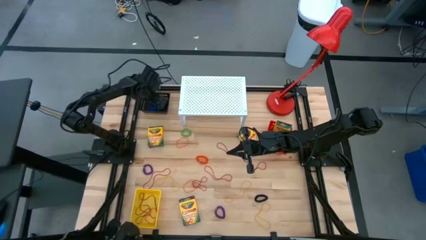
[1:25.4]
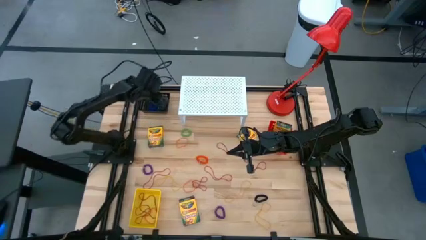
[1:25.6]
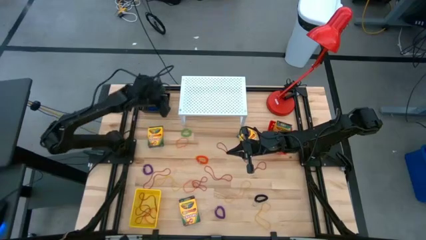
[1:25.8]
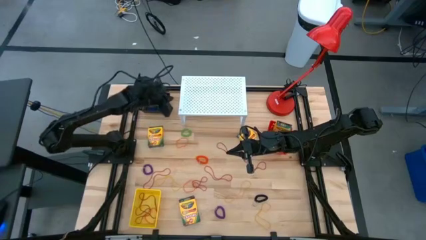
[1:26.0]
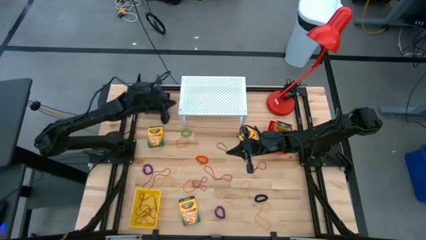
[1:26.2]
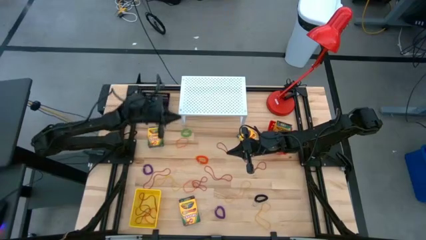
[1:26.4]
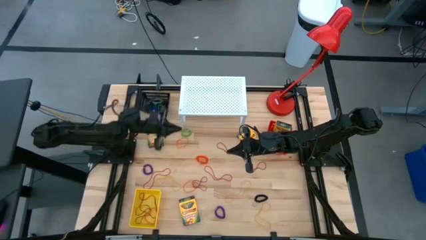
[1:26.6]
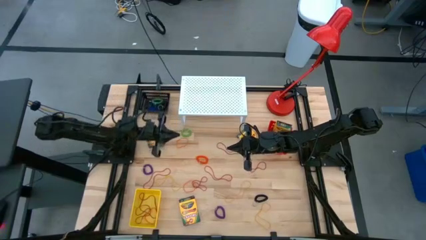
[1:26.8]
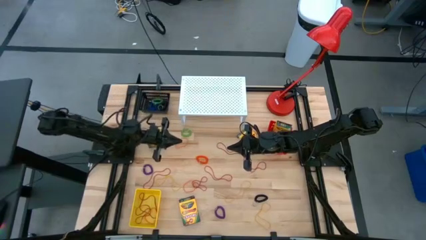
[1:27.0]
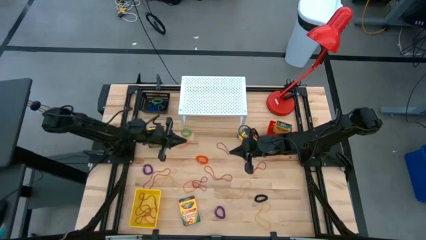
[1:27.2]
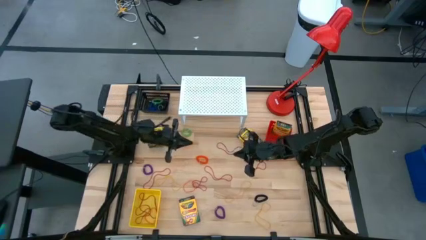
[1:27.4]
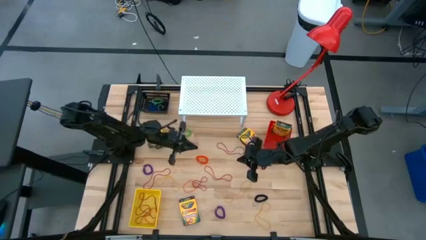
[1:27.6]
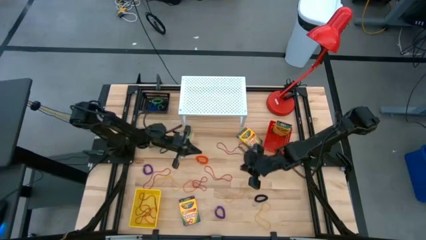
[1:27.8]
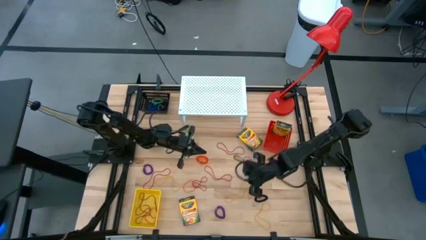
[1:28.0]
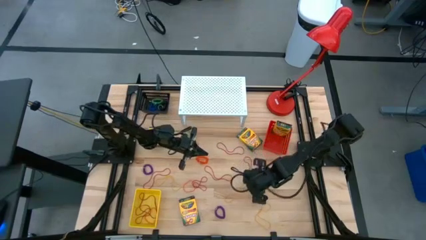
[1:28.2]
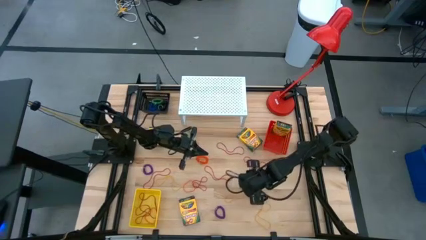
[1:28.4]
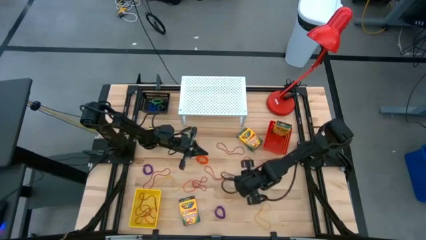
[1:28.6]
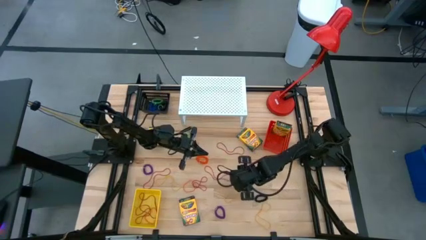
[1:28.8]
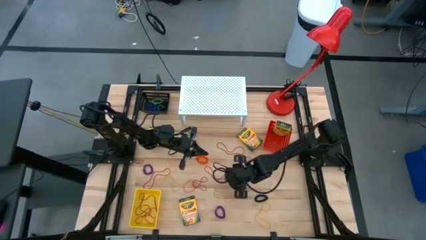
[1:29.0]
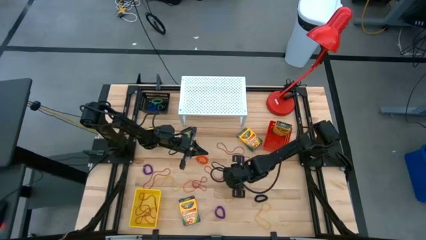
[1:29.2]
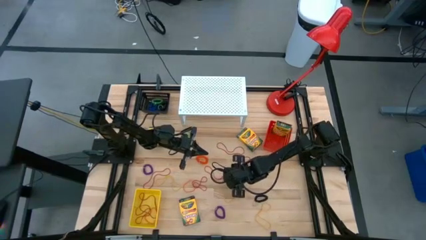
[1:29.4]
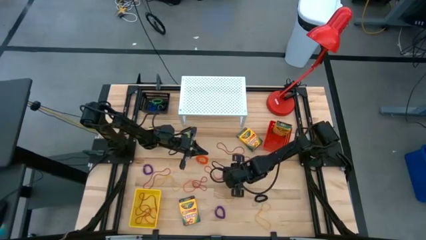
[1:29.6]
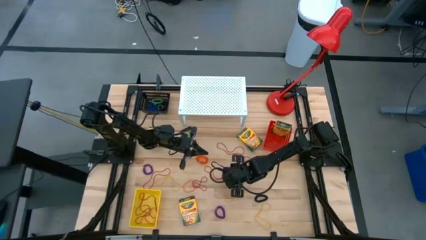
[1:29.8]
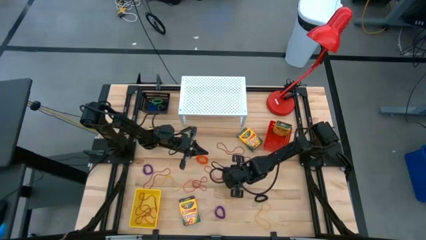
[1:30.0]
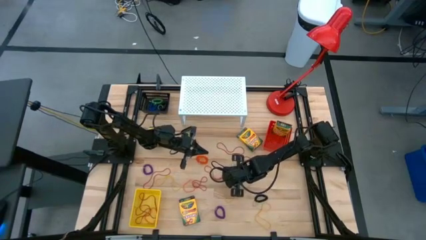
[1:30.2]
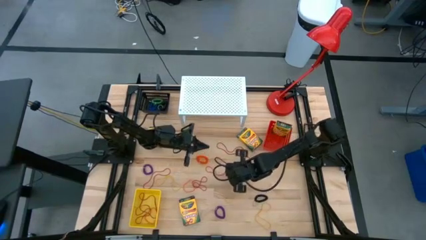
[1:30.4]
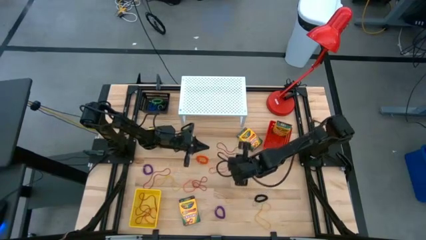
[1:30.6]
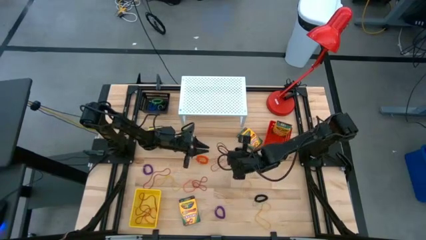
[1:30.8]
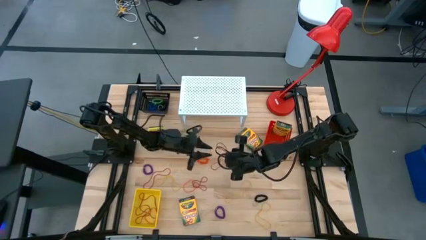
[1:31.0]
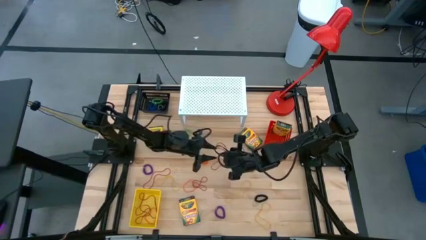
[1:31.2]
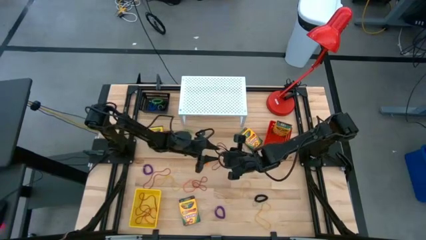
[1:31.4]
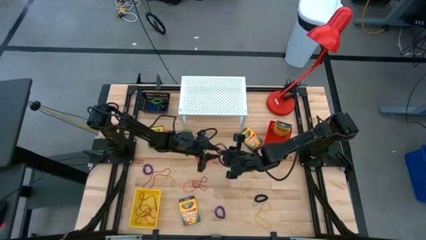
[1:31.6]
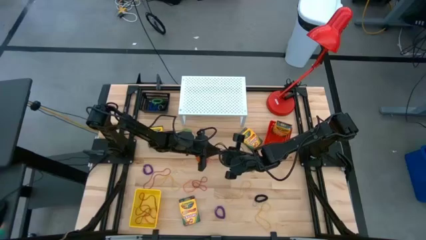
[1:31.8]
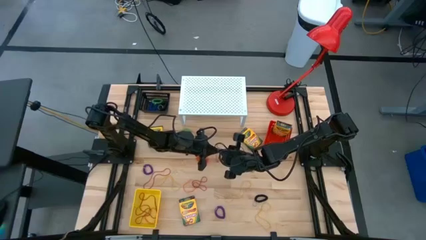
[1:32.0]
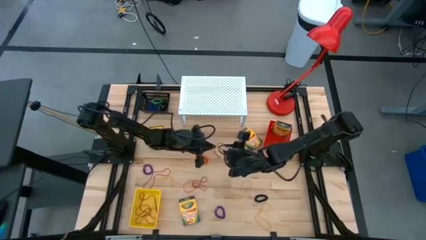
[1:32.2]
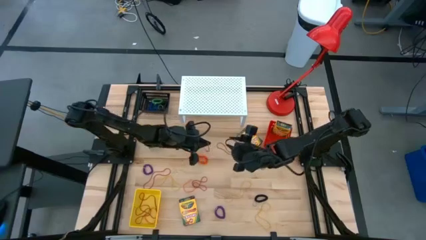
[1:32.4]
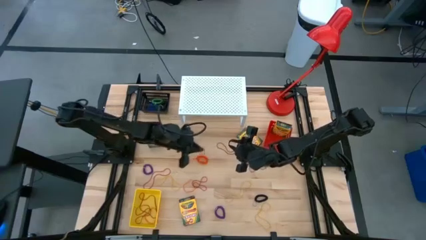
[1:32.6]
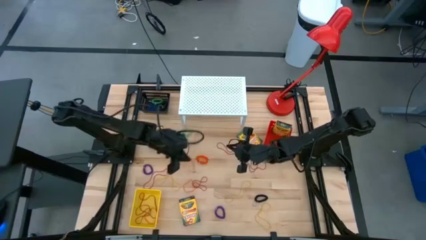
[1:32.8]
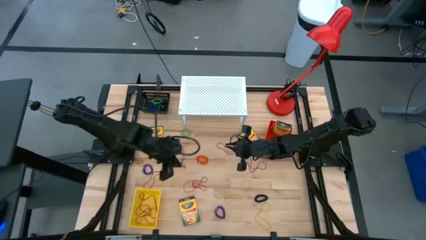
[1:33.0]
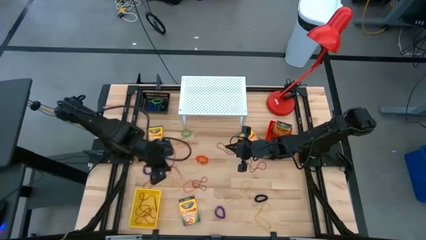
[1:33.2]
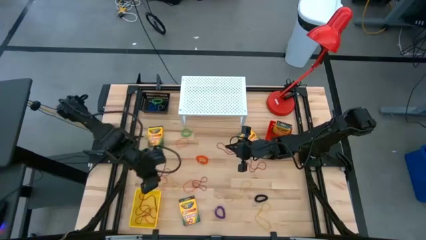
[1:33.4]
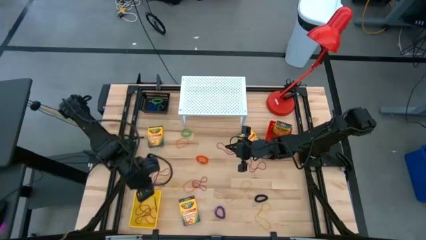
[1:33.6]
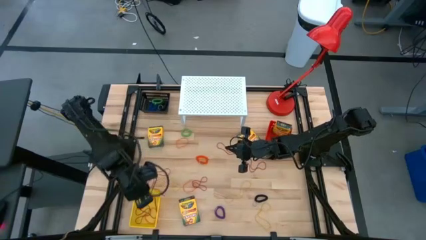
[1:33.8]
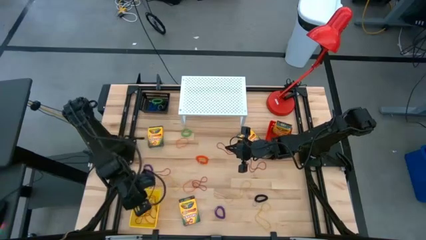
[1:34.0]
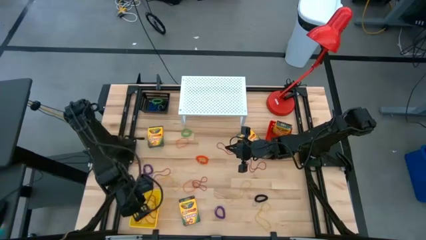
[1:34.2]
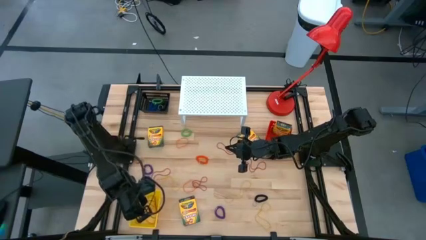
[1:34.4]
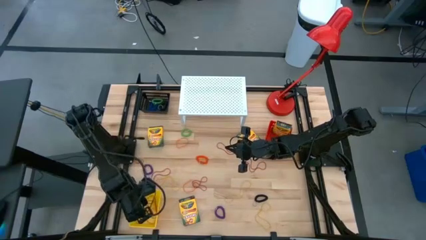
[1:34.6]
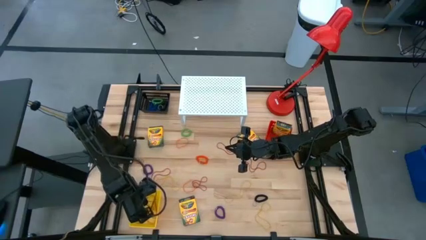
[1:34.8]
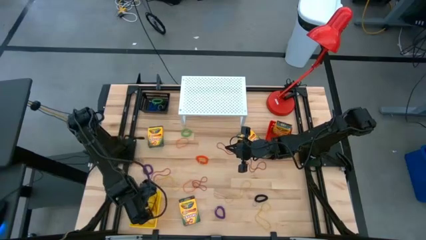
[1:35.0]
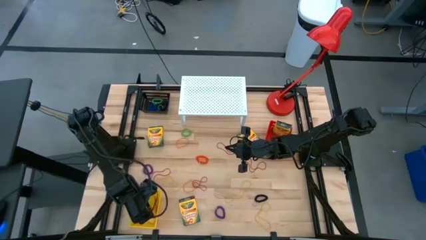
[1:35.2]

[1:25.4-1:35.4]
Task: Pick & Place Office Desk Supplies
Put the red rubber band into the yellow bin

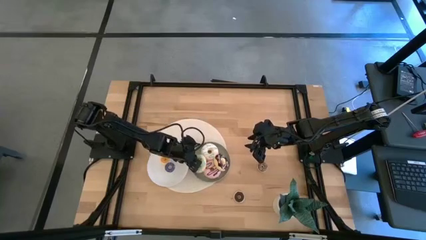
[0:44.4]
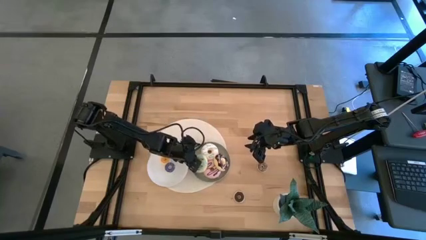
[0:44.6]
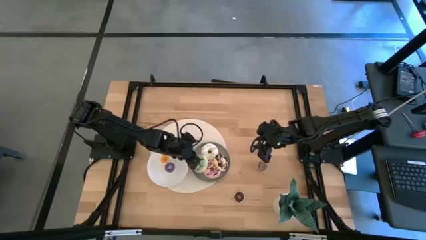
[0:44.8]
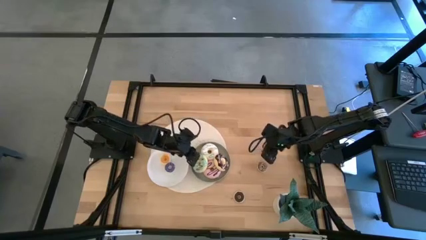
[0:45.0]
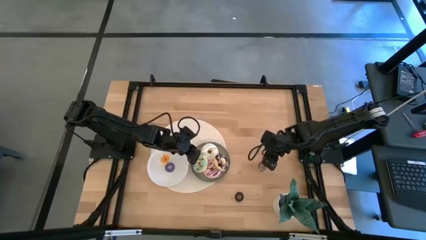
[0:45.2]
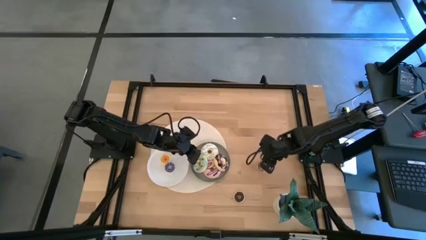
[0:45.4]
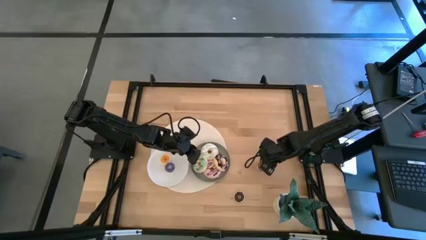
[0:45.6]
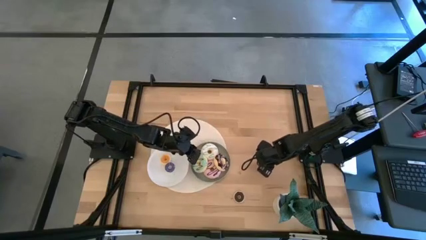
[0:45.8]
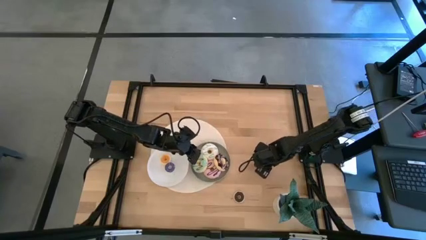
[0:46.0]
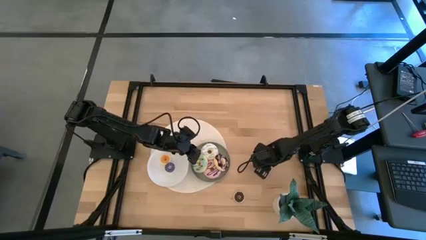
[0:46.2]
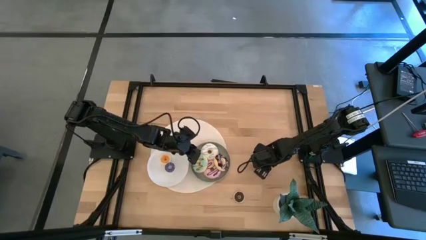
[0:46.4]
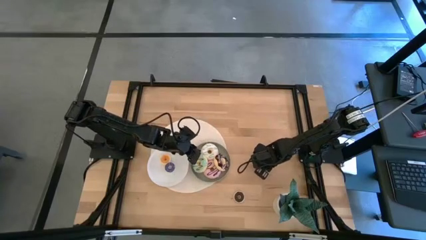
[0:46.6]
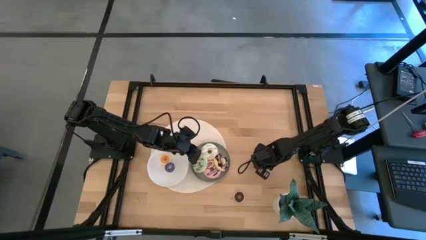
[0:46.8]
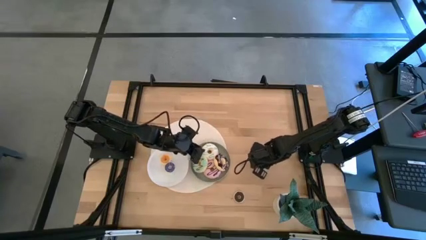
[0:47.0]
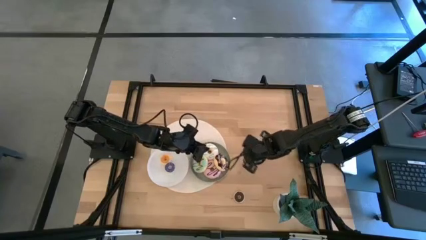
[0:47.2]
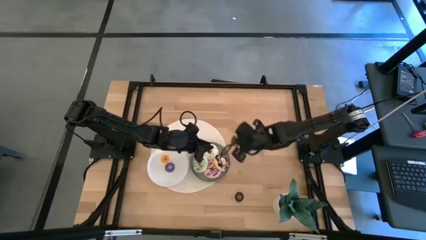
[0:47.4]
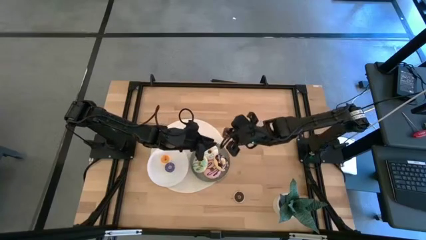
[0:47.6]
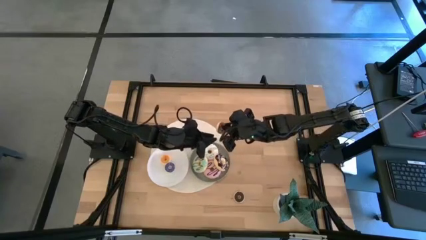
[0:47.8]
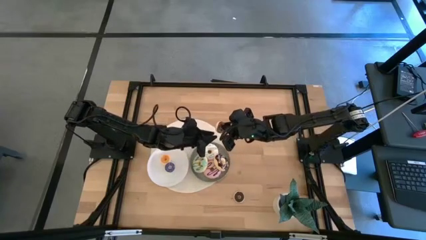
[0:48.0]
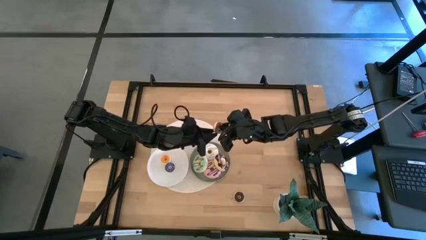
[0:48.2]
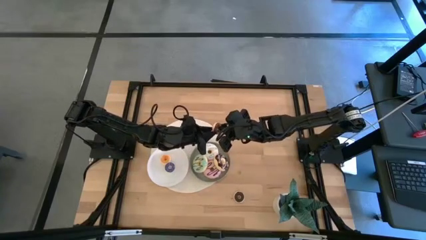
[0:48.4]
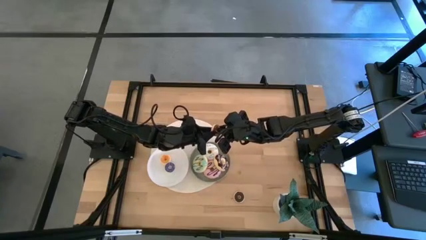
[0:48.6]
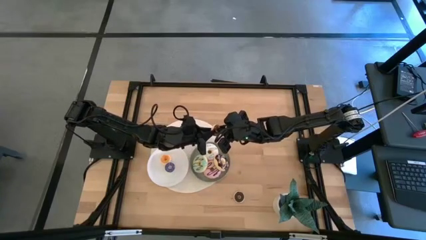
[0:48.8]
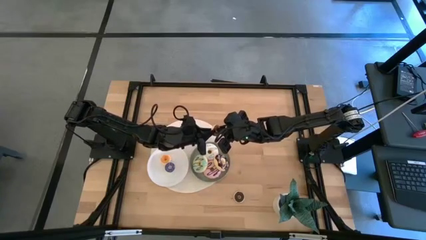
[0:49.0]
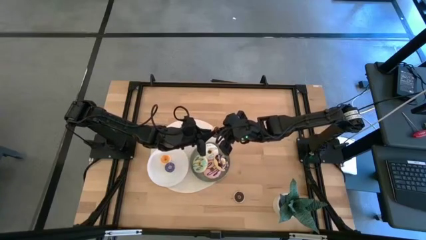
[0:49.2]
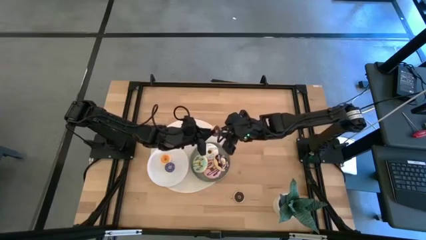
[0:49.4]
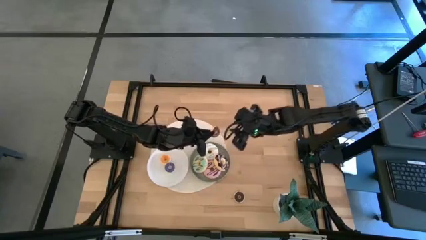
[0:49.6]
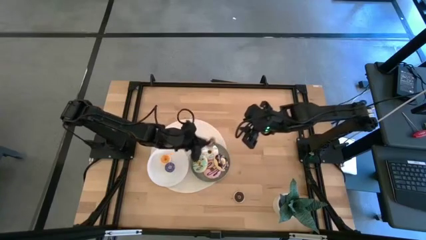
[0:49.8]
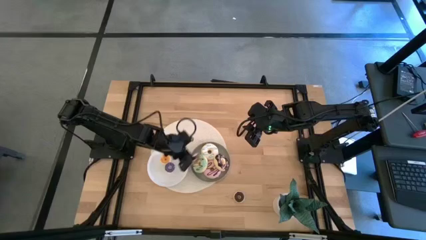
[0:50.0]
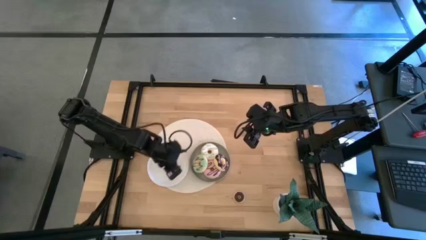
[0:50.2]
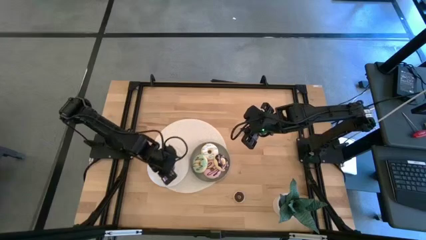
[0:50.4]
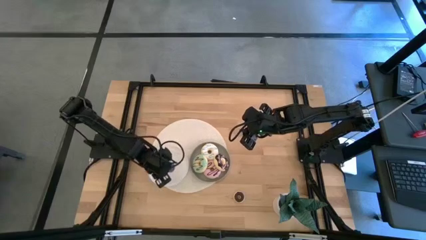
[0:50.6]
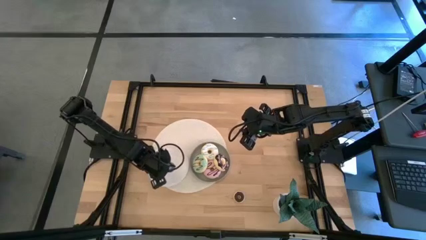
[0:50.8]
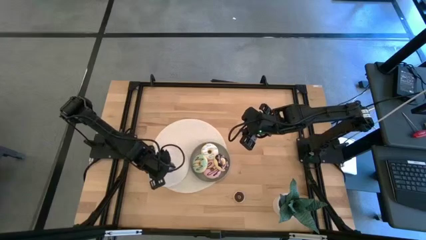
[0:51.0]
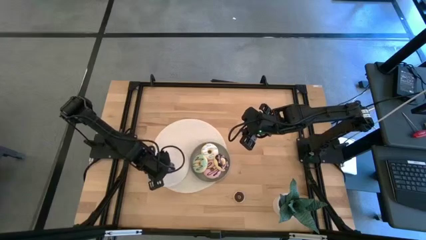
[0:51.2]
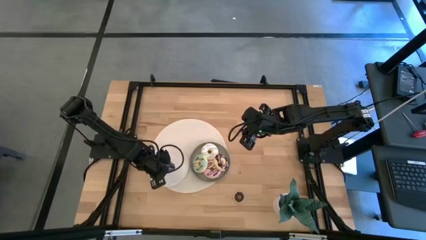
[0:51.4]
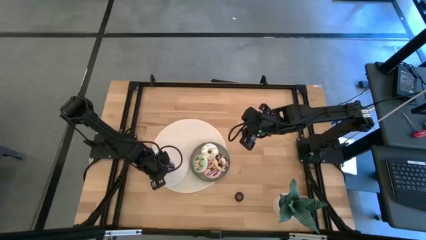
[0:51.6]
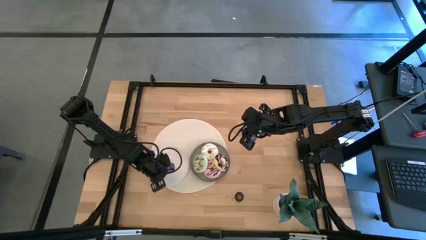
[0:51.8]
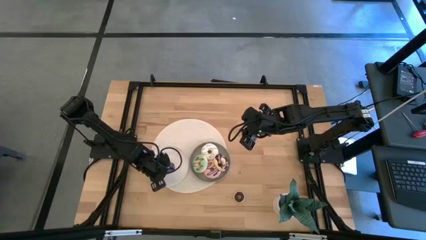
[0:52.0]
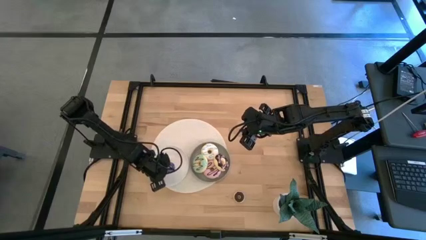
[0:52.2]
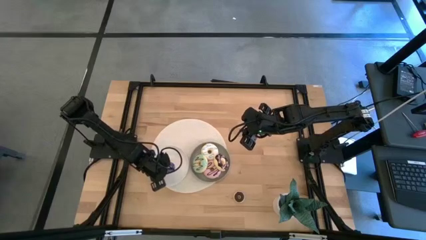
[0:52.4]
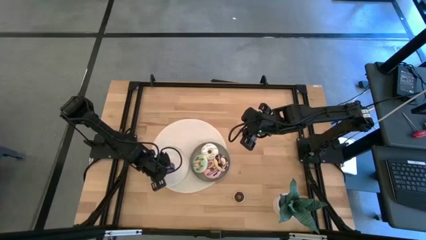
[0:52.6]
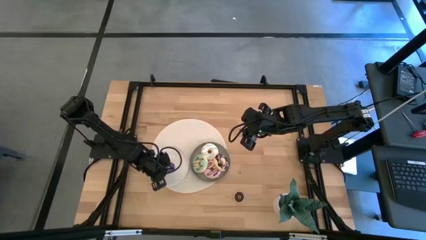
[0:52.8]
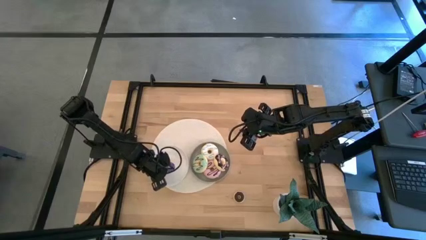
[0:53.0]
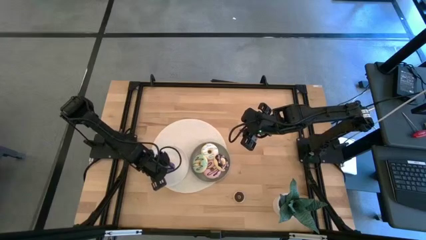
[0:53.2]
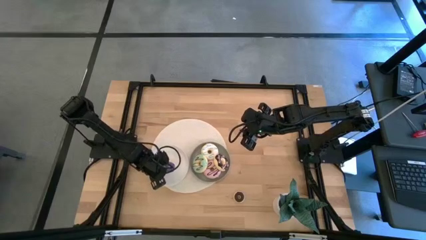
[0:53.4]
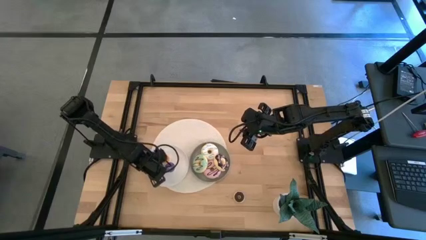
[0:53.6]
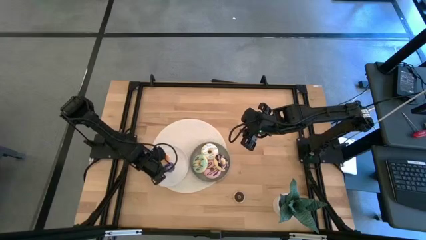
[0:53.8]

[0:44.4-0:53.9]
Task: Pick & Place donuts
Put the small brown donuts on the white plate
